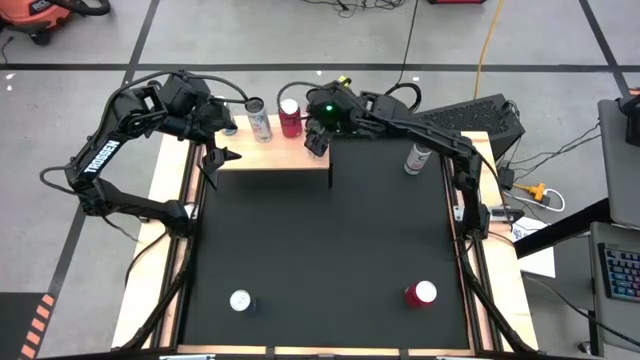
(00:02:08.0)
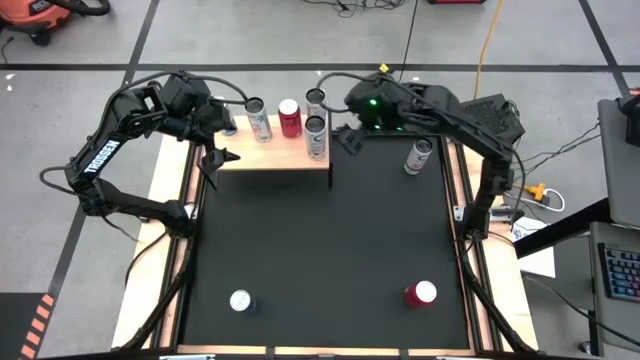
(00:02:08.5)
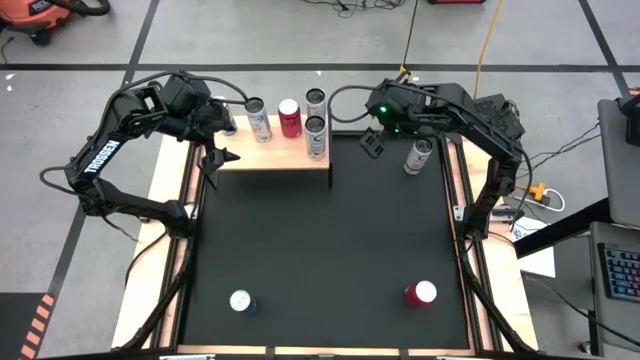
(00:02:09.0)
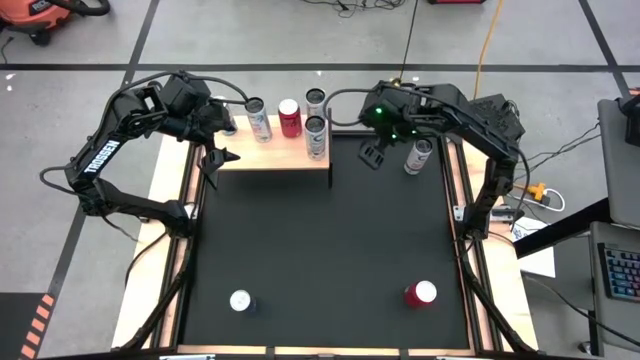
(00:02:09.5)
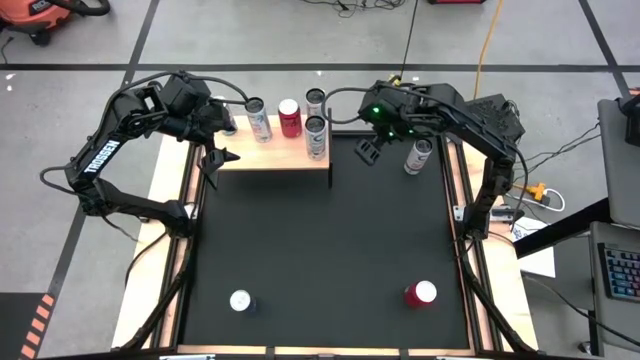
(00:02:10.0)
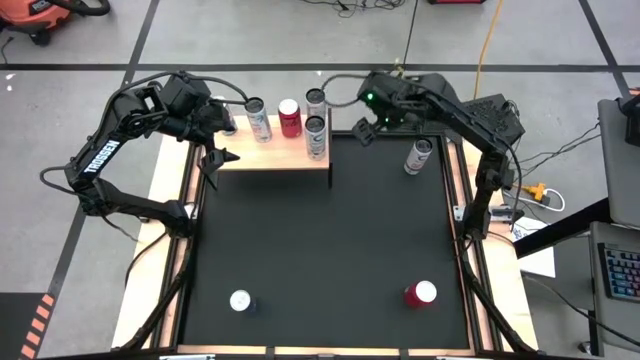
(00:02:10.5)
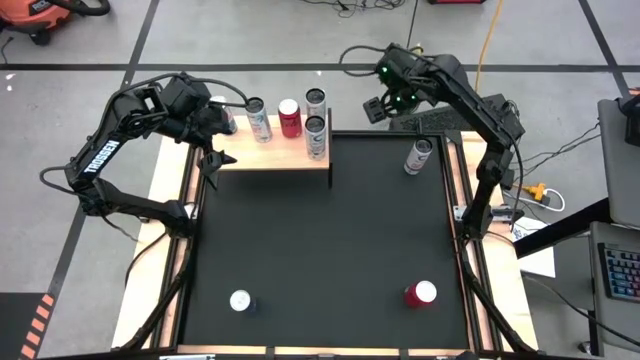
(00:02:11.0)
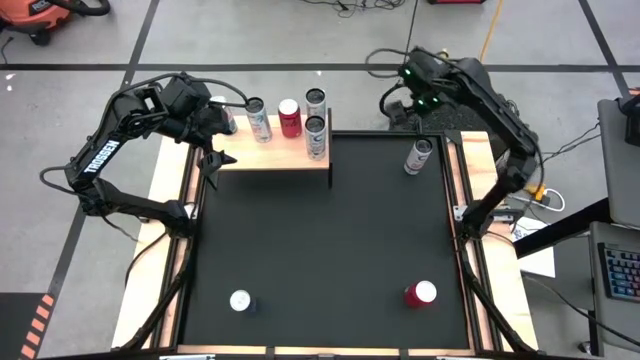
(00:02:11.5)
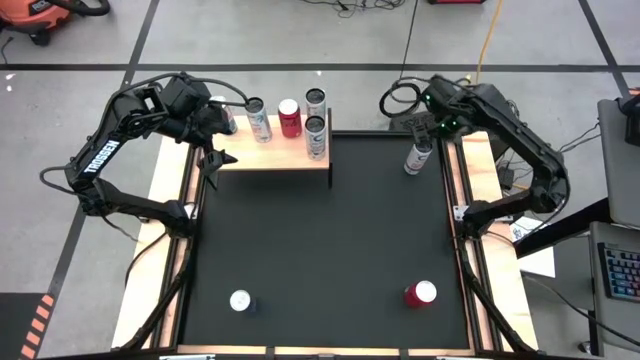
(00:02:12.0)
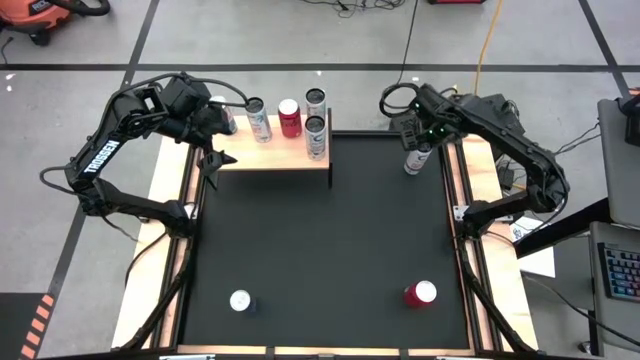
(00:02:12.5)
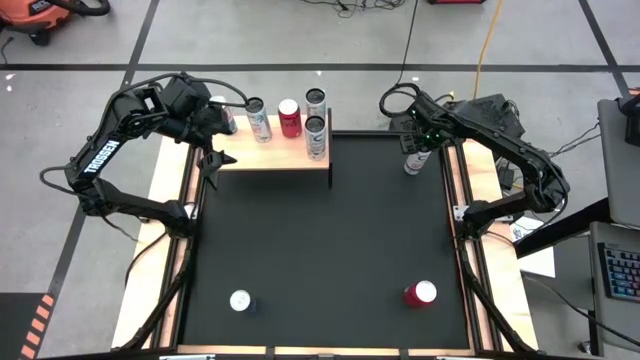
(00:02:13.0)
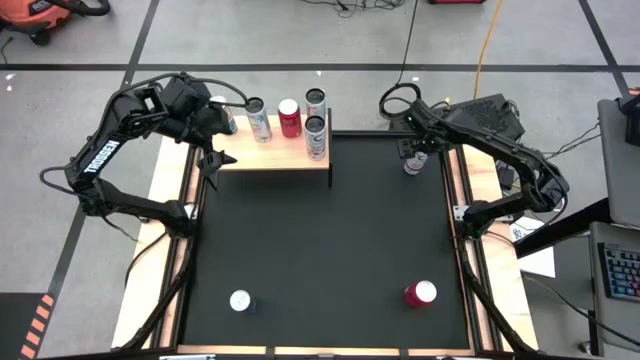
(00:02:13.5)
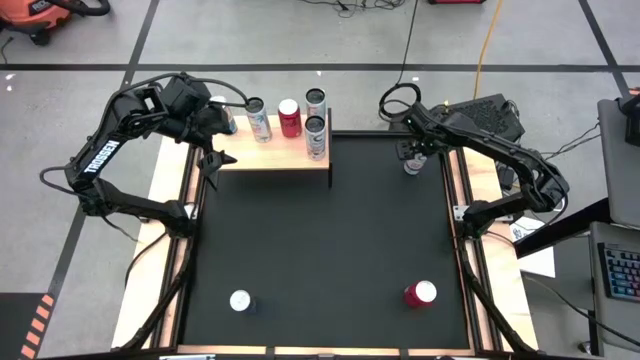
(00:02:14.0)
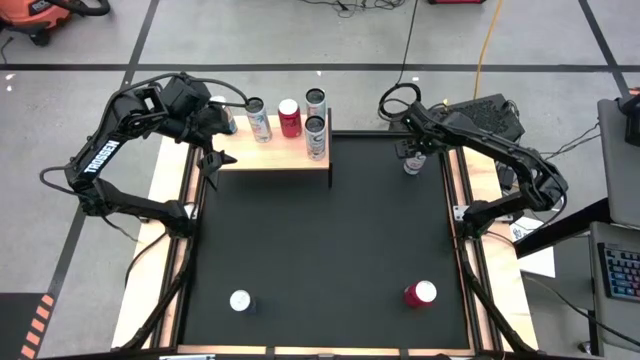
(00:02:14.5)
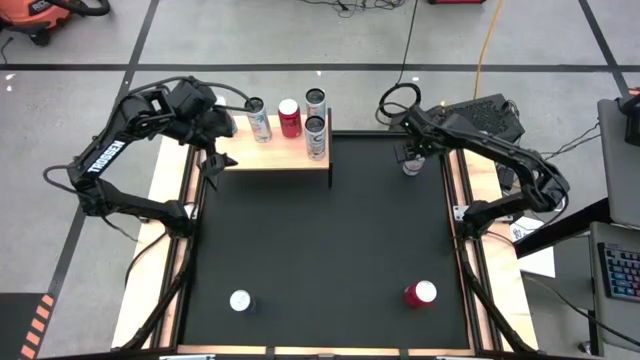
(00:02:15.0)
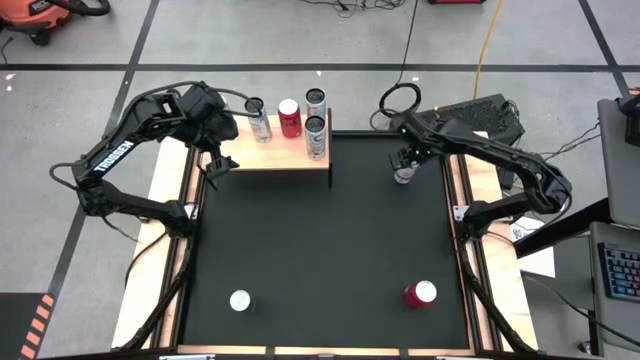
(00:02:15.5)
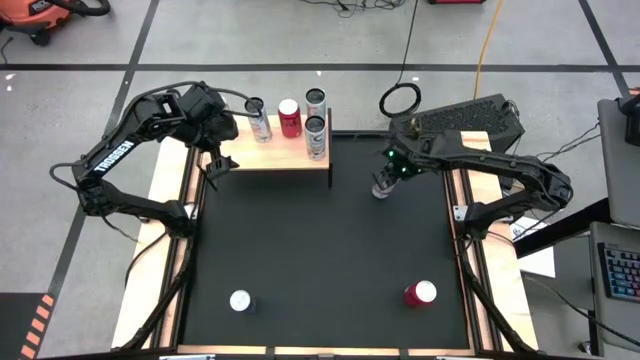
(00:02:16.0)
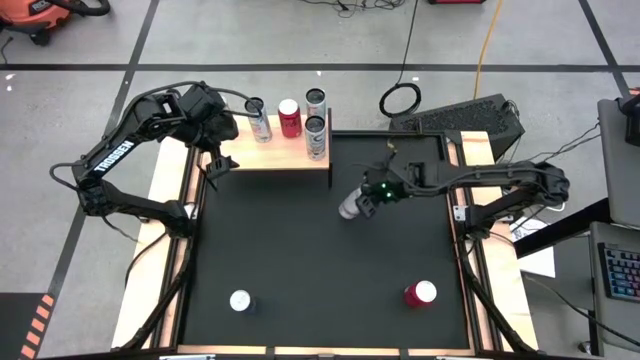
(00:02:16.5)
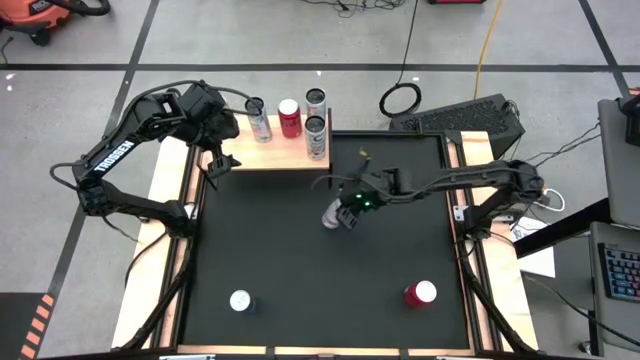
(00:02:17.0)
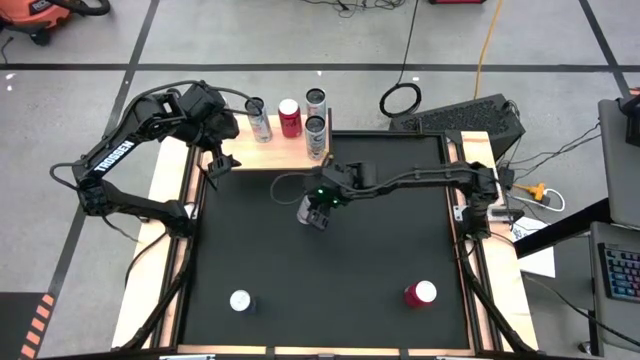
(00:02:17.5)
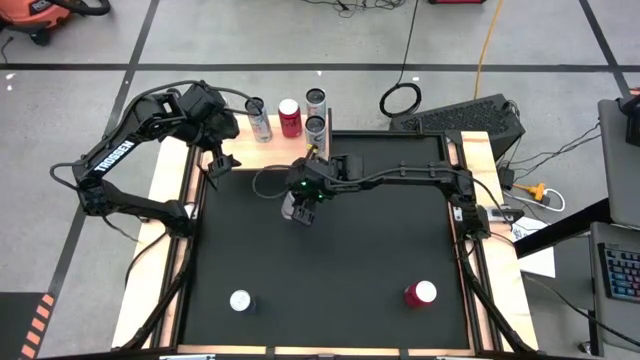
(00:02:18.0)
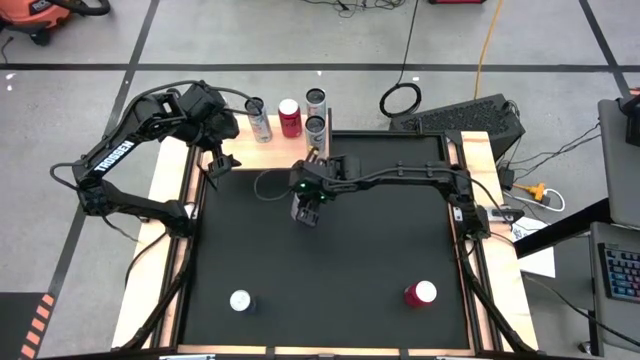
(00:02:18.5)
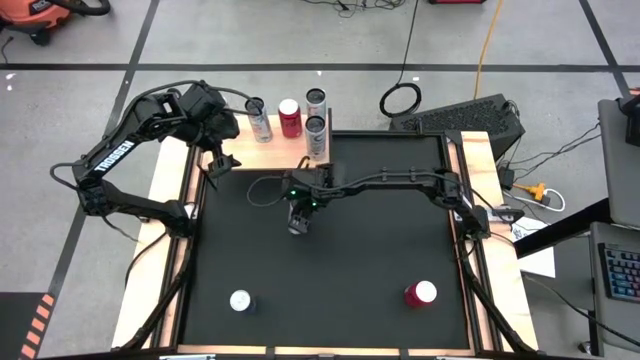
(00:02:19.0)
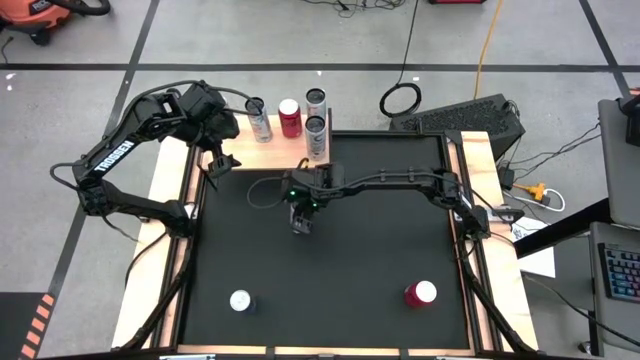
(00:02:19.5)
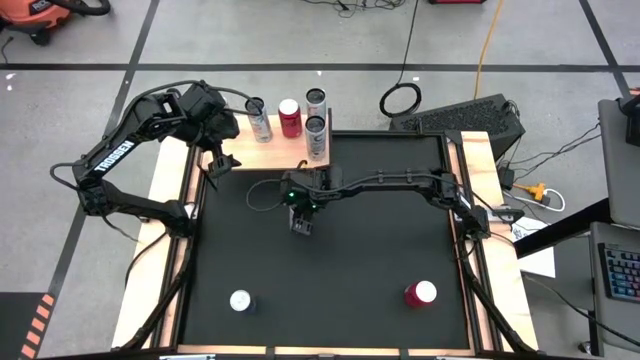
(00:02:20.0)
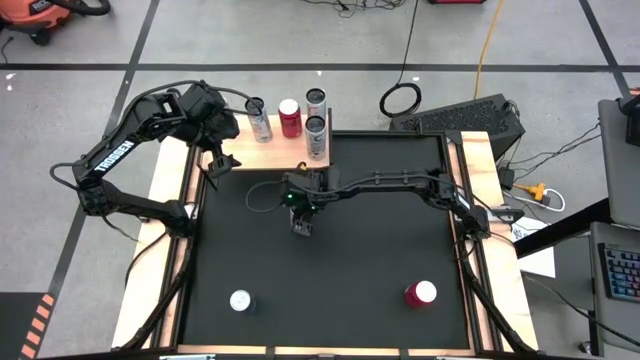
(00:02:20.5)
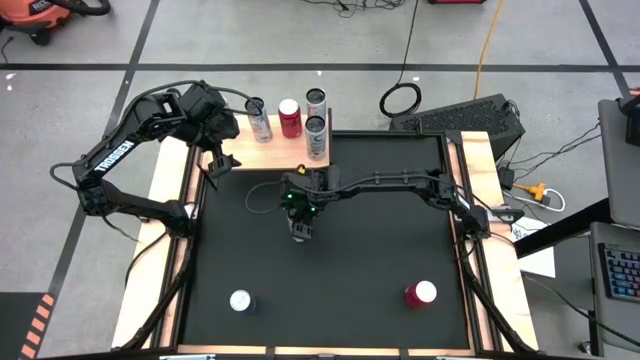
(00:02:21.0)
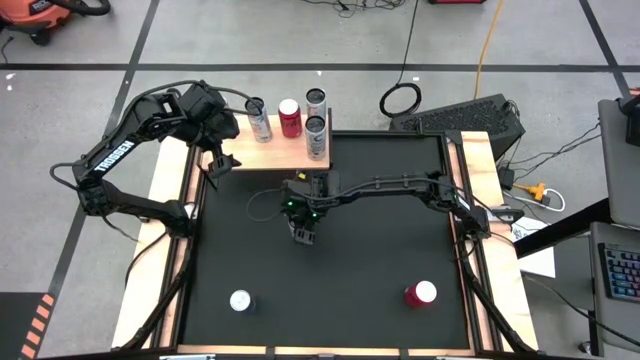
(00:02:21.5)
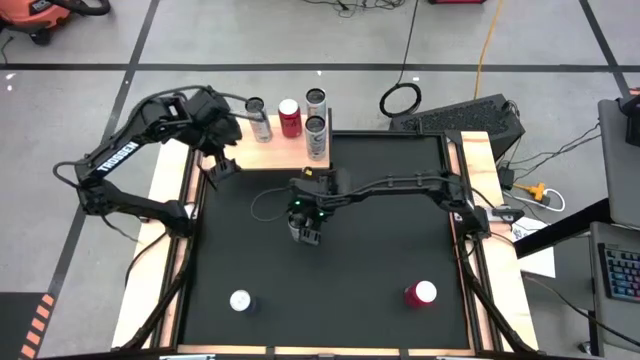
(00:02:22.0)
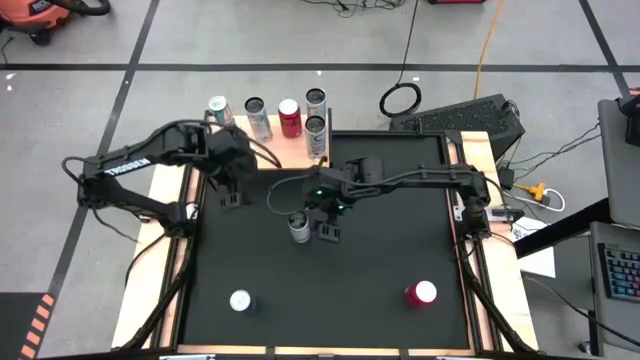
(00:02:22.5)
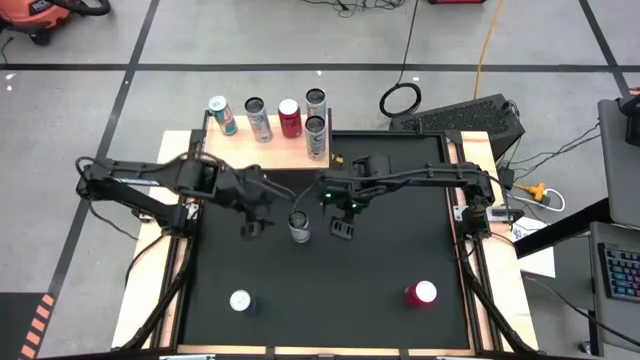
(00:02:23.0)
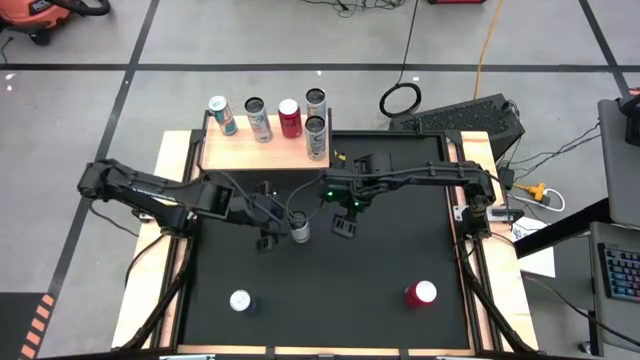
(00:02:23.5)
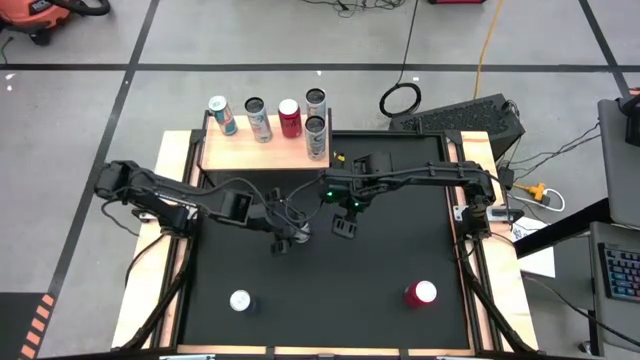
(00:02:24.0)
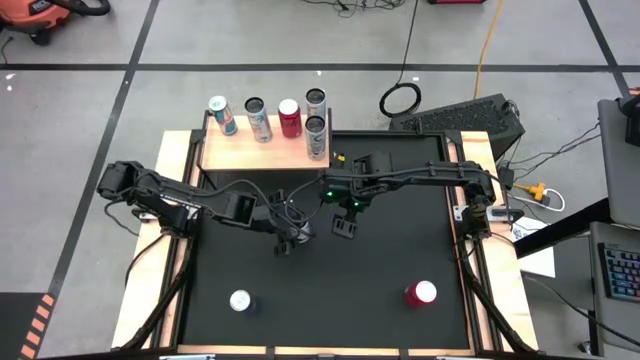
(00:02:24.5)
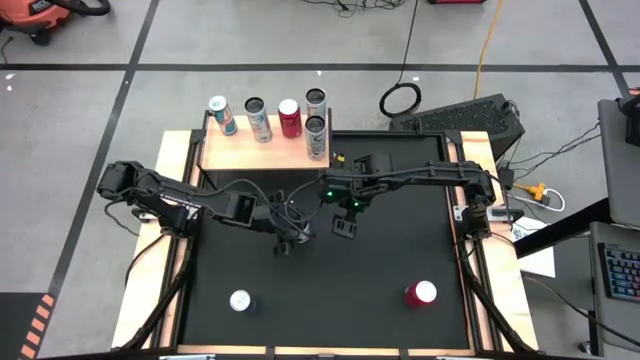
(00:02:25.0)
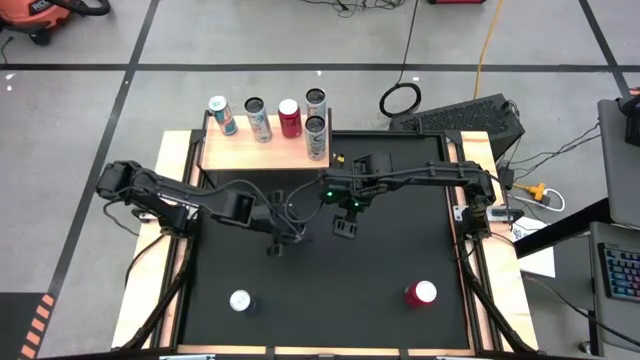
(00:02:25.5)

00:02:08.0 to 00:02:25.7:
Task: Place canned beverage on shelf
Put the white pink soda can on the shelf aligned with the other white pink soda can
